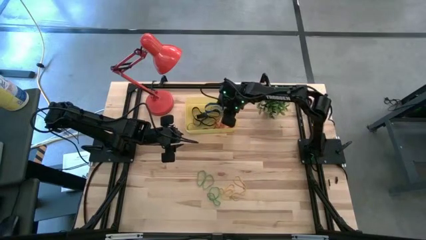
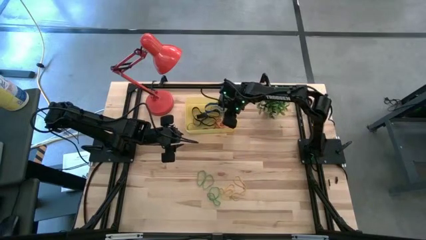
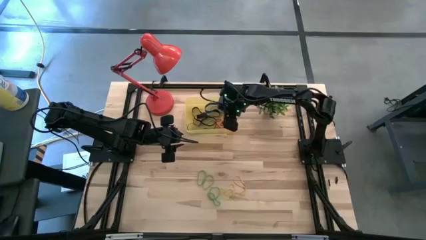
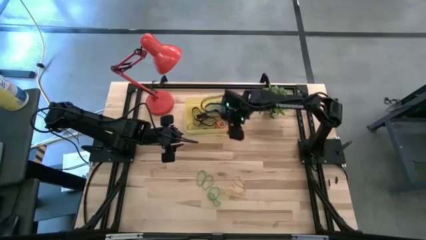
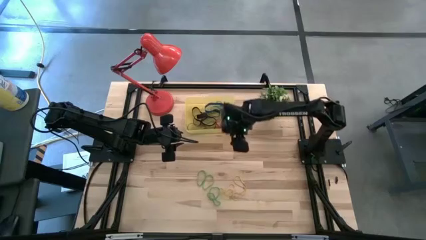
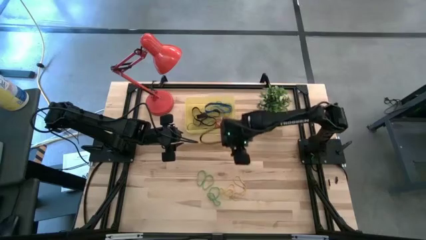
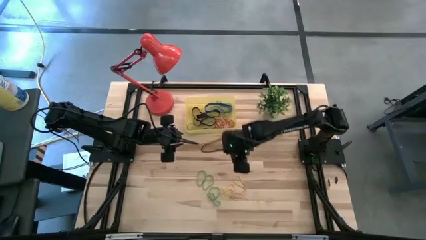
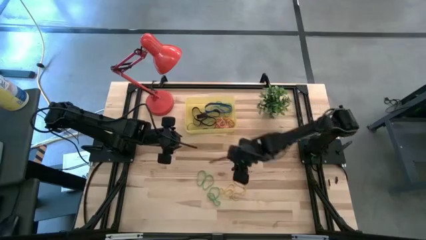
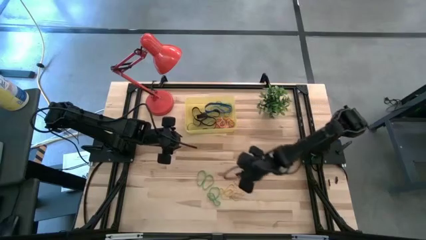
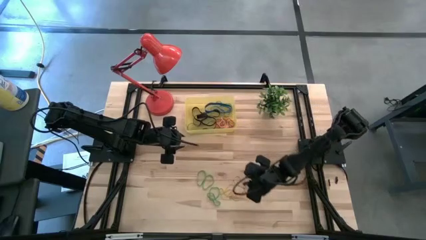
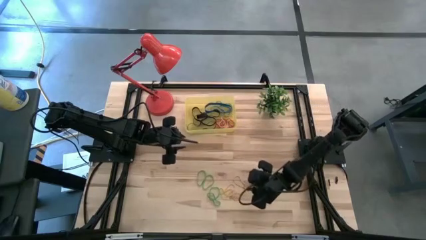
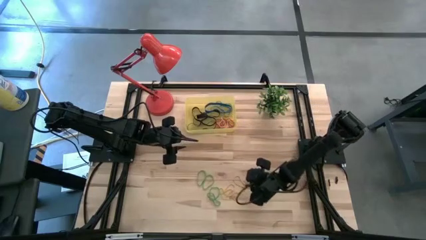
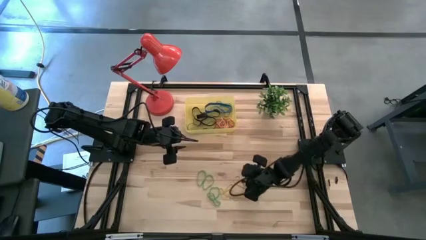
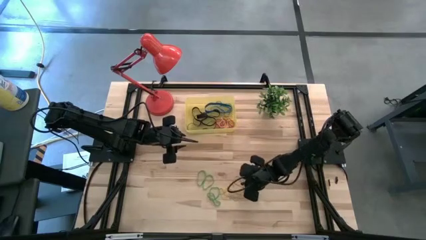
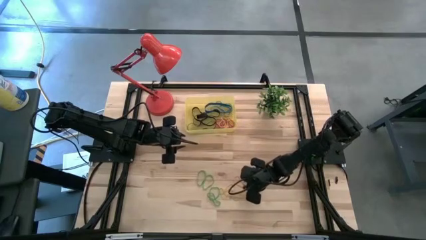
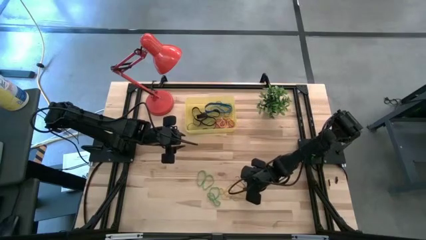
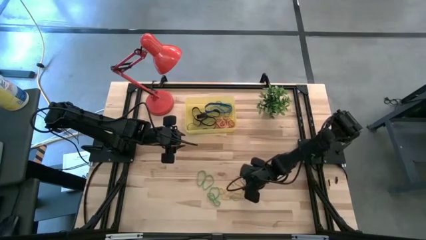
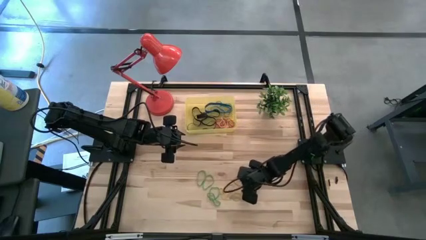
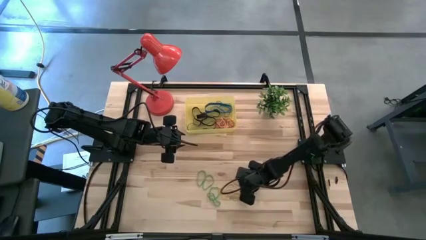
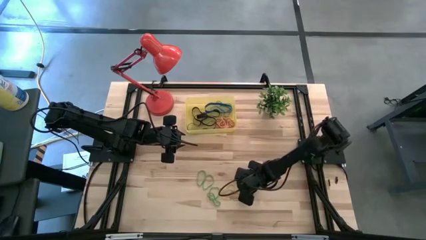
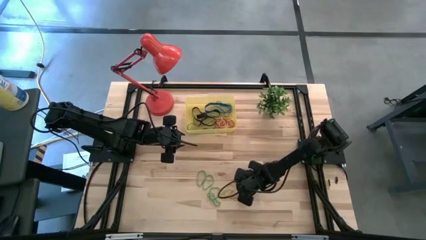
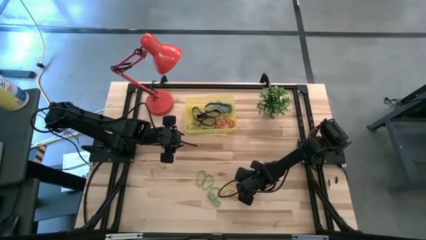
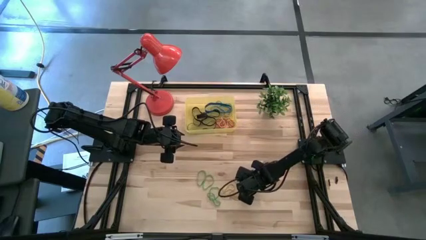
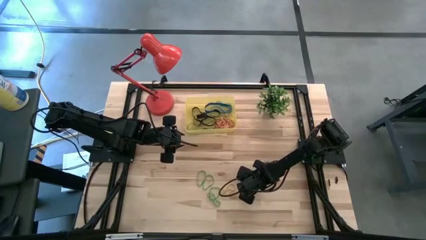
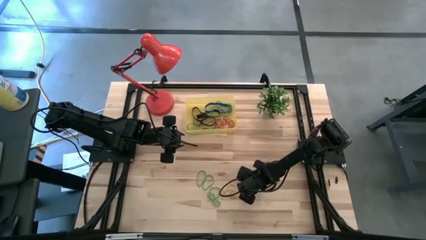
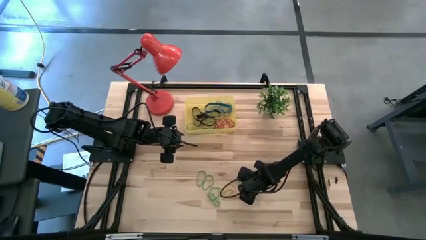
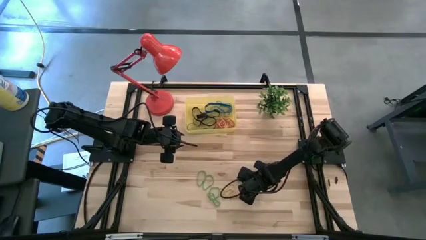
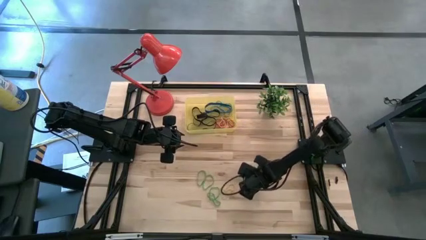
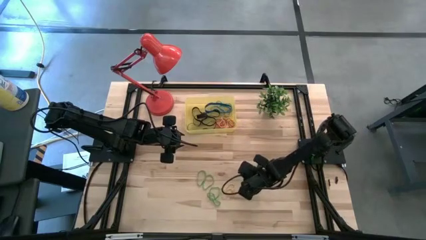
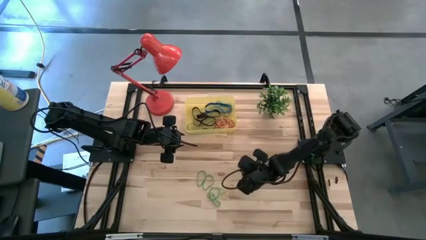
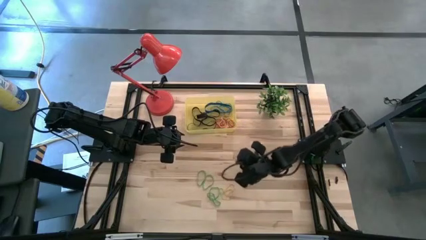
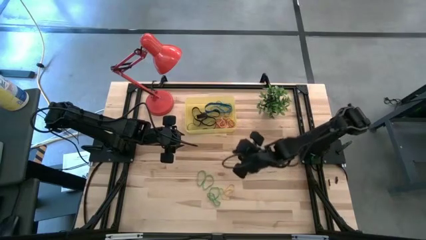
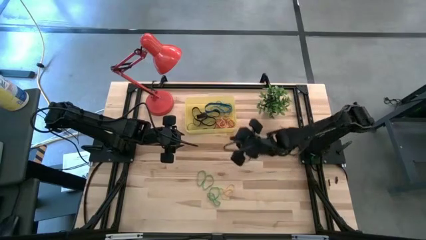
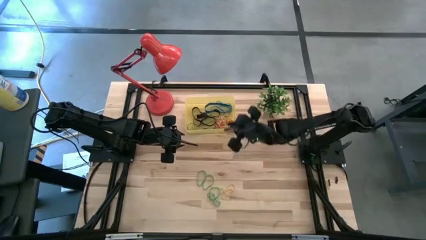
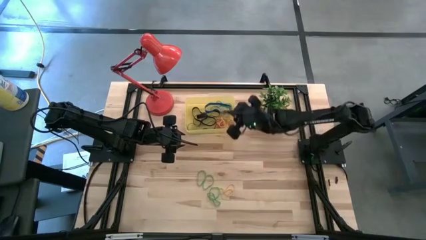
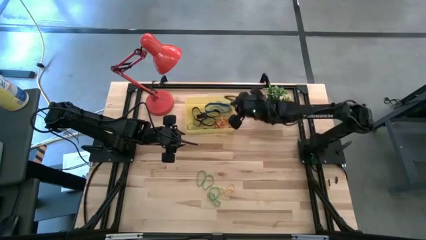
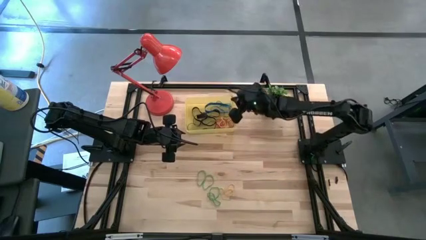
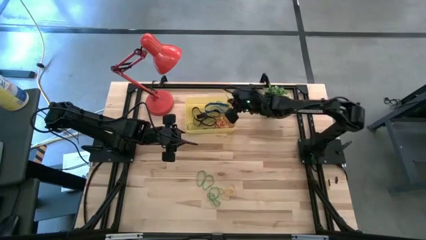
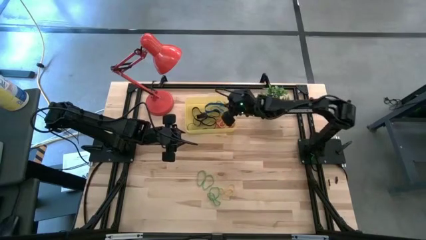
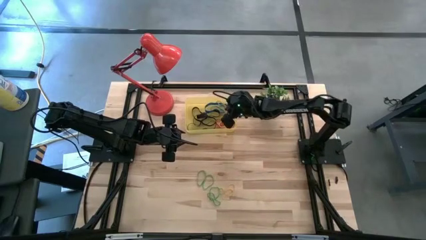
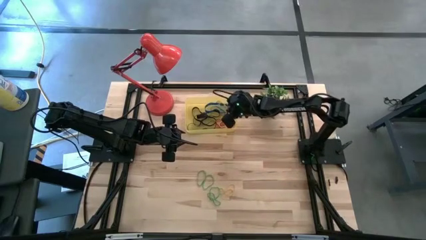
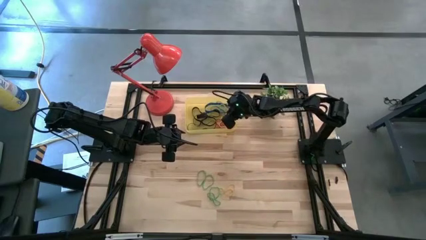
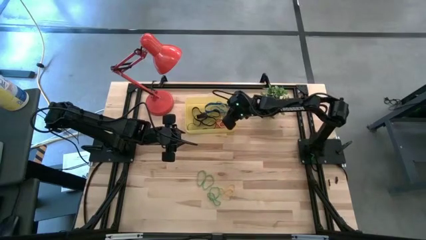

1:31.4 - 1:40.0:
Task: Pick and place rubber bands into bin
Put the yellow rubber band into the yellow container

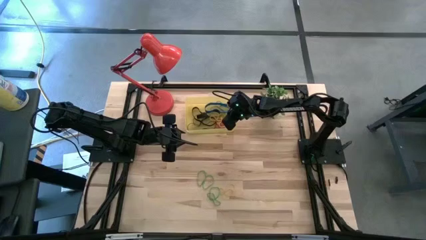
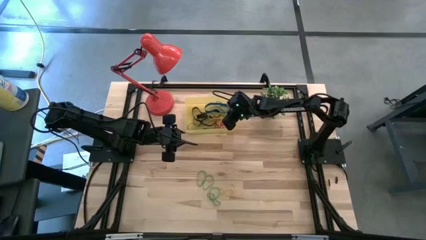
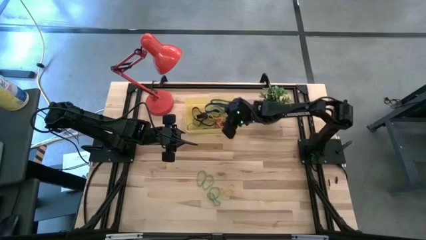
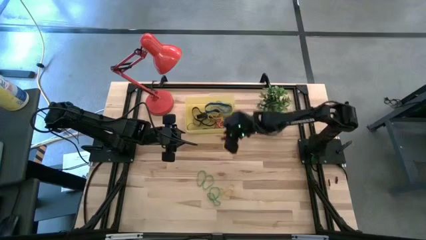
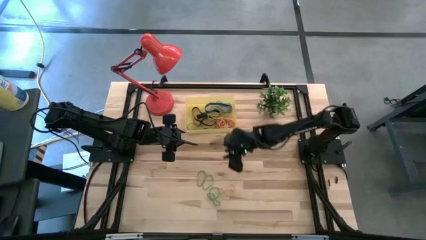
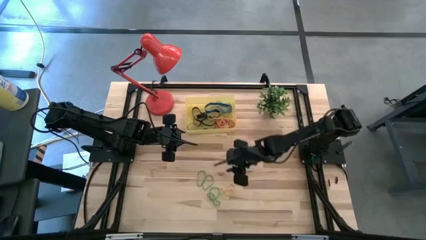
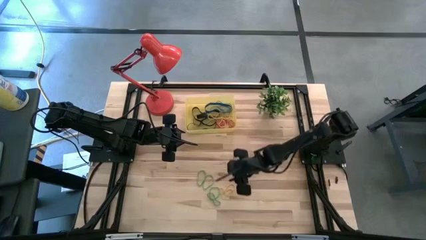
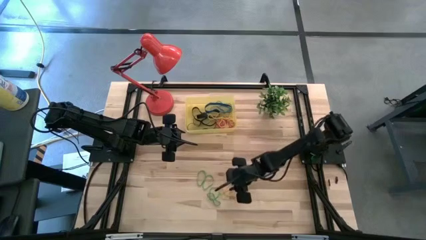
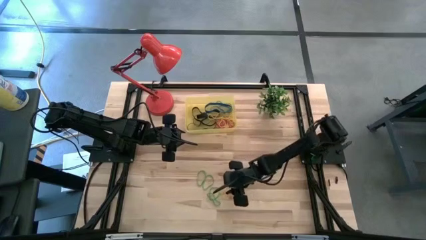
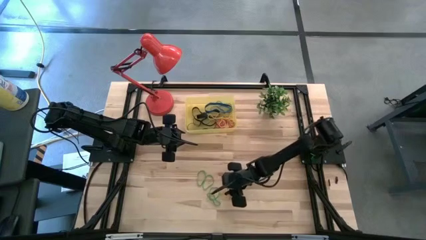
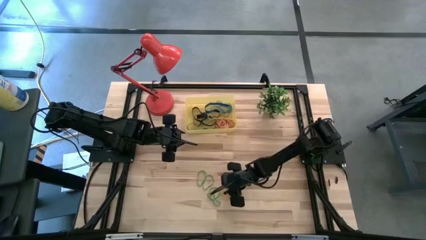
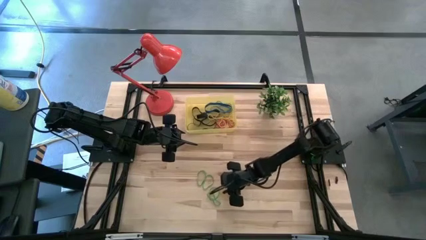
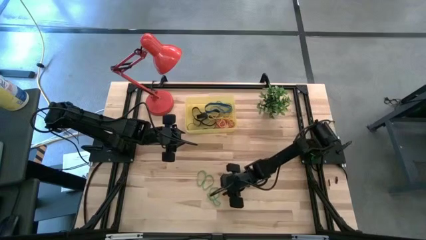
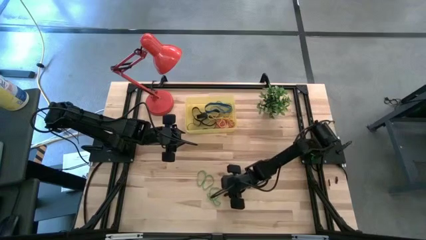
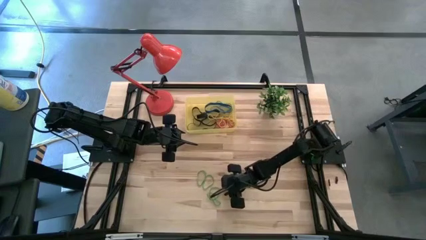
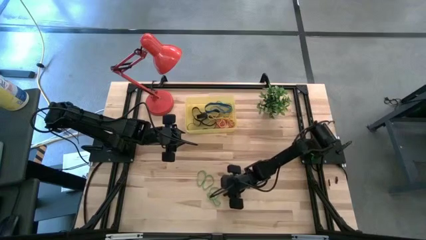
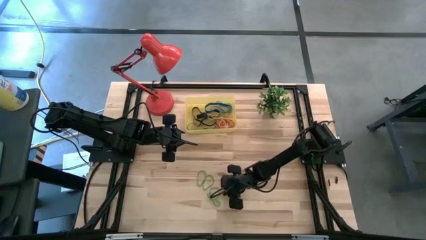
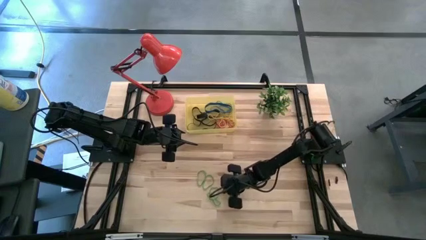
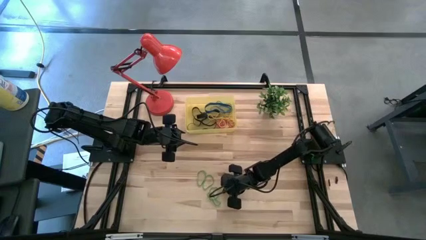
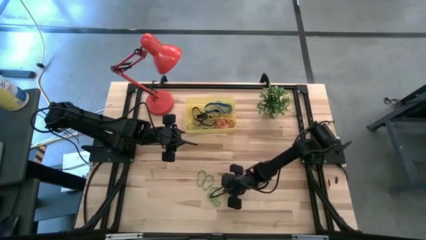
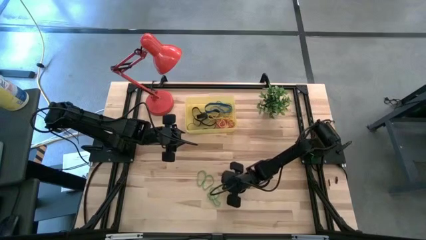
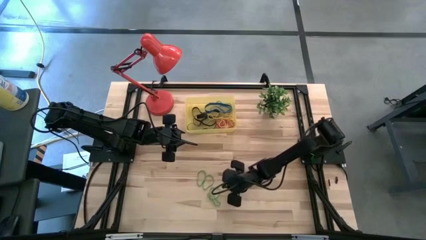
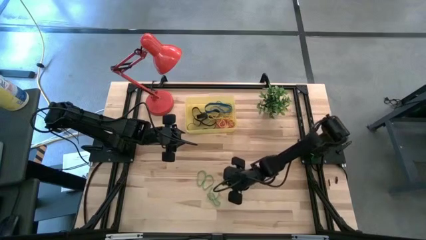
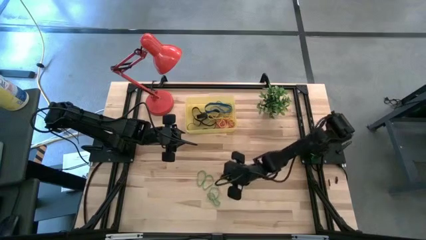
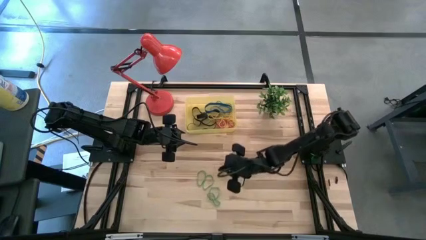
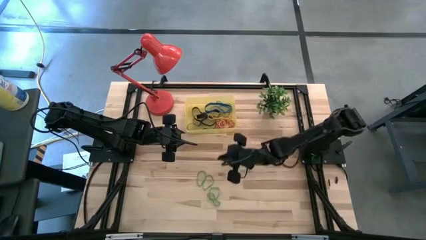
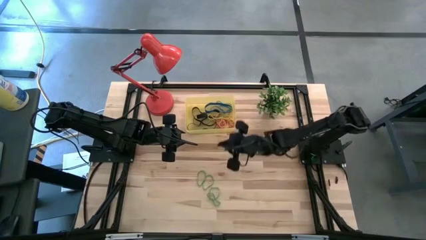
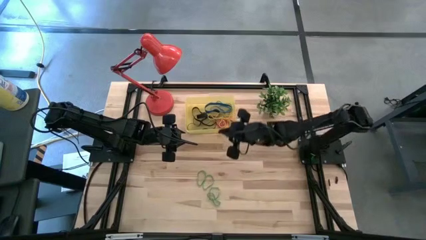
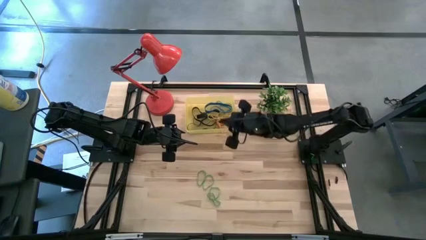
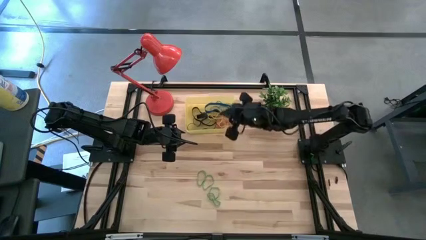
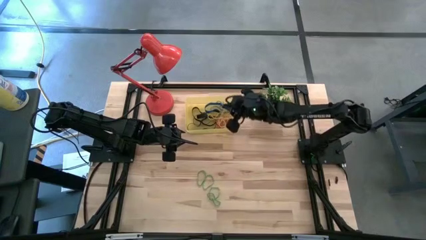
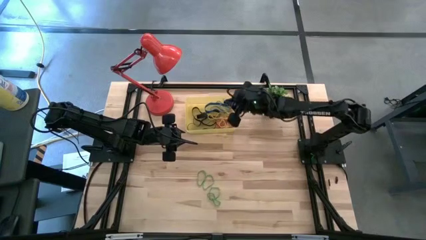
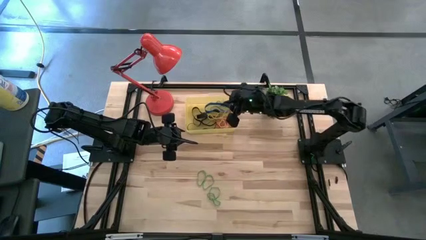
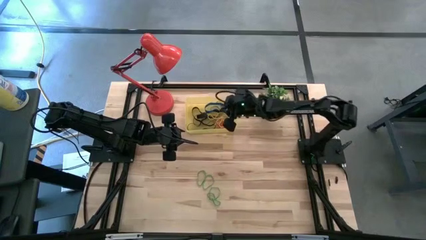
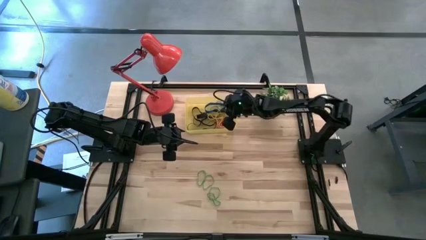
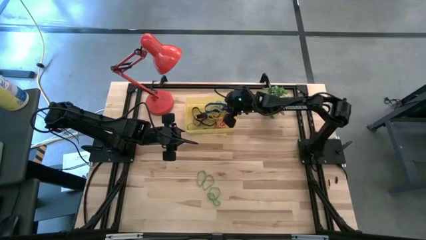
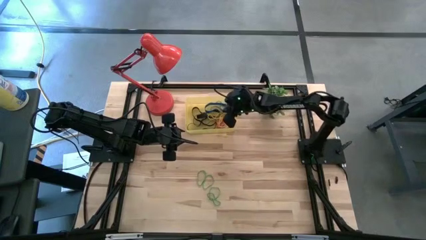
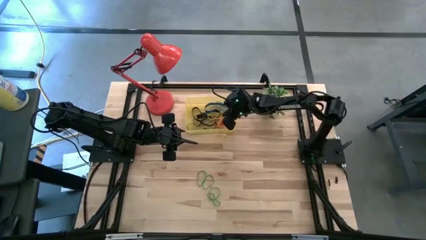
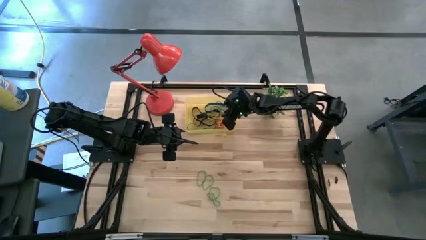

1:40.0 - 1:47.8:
Put the yellow rubber band into the yellow container
